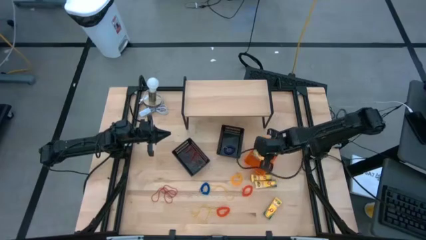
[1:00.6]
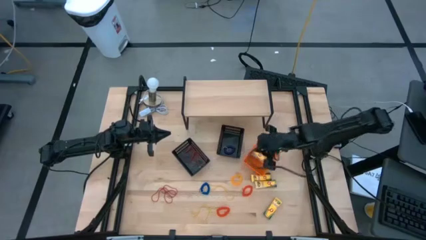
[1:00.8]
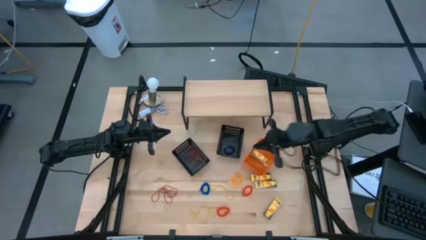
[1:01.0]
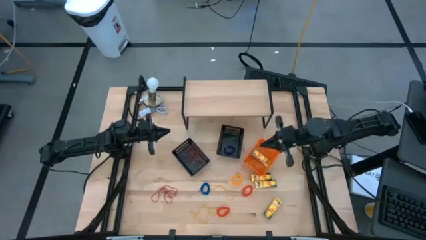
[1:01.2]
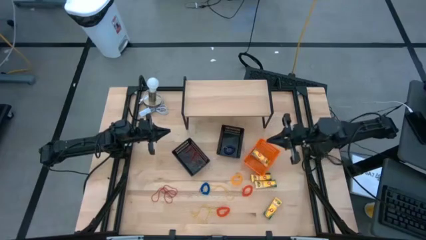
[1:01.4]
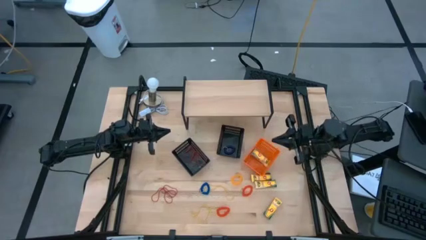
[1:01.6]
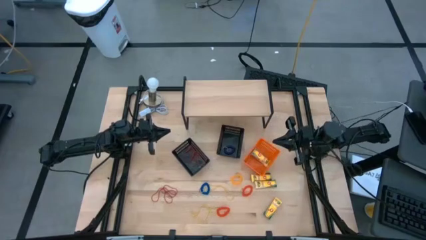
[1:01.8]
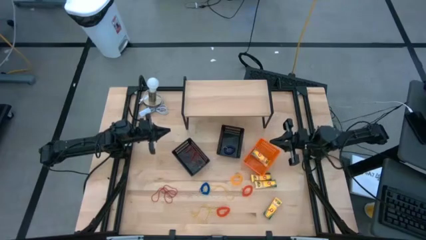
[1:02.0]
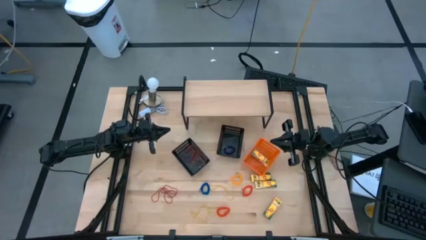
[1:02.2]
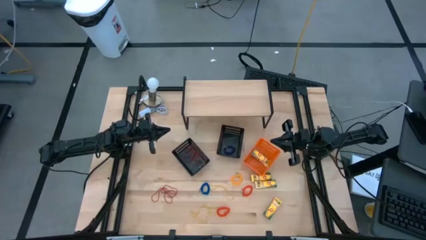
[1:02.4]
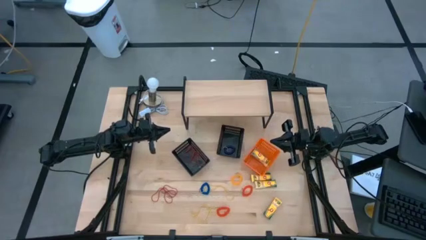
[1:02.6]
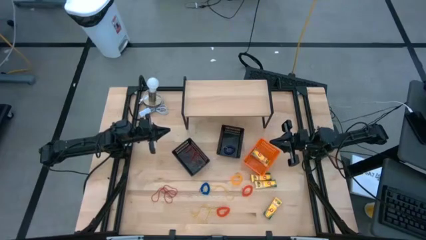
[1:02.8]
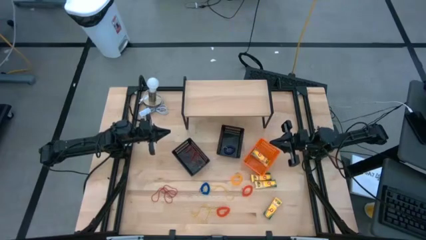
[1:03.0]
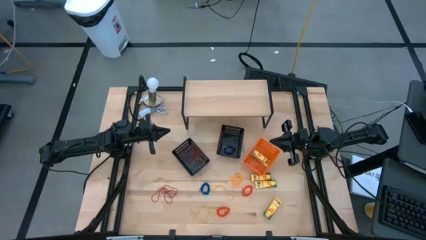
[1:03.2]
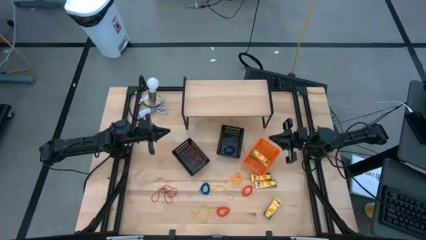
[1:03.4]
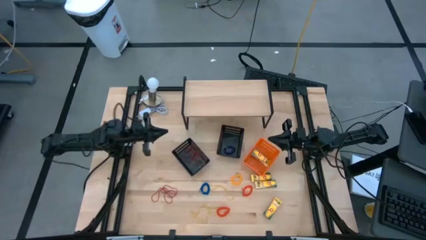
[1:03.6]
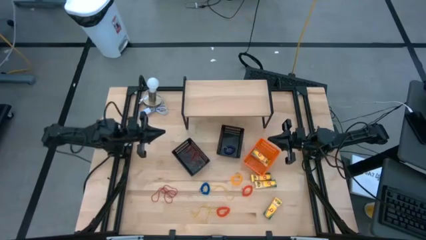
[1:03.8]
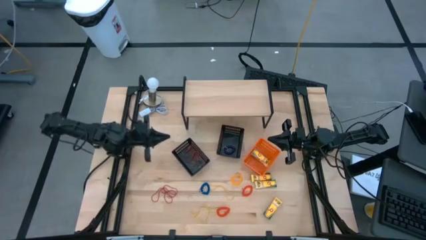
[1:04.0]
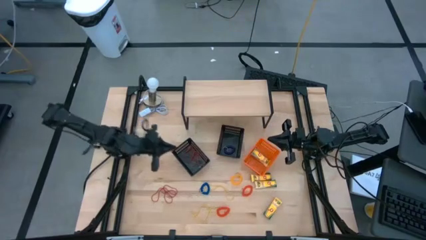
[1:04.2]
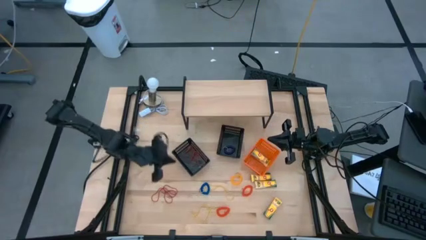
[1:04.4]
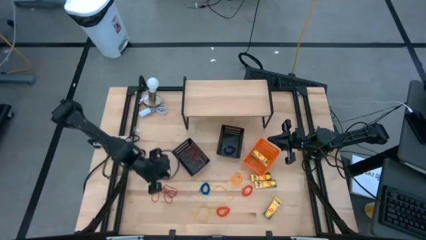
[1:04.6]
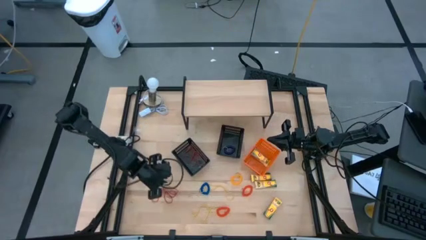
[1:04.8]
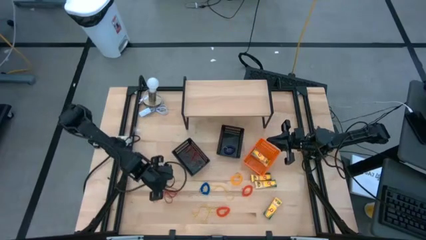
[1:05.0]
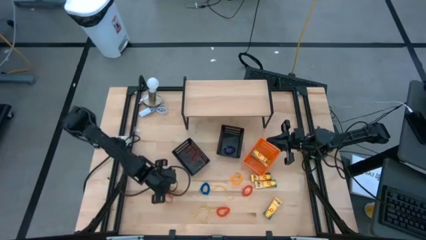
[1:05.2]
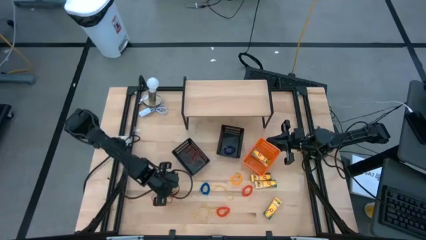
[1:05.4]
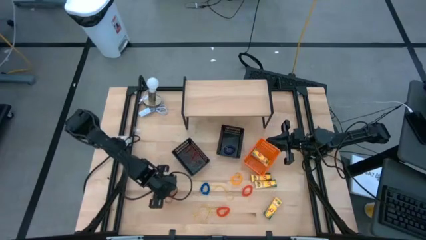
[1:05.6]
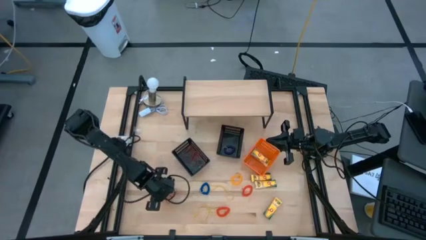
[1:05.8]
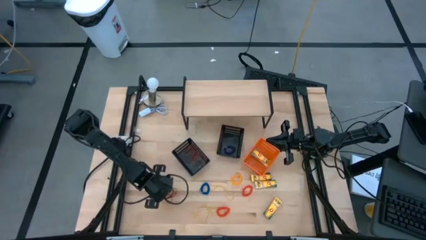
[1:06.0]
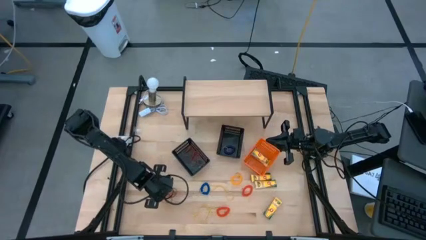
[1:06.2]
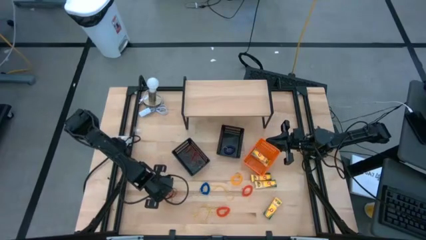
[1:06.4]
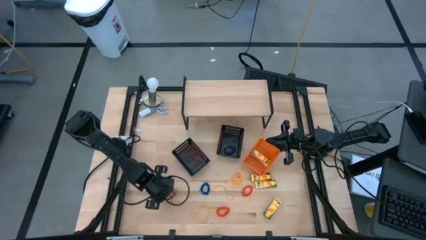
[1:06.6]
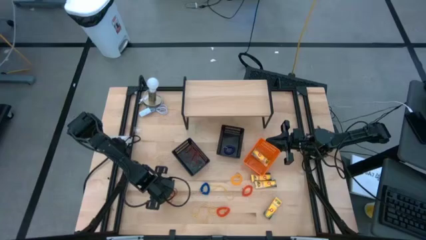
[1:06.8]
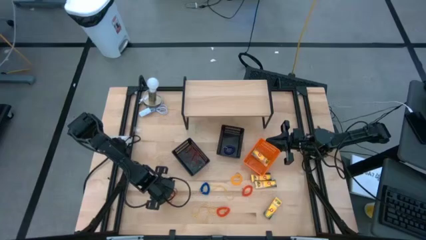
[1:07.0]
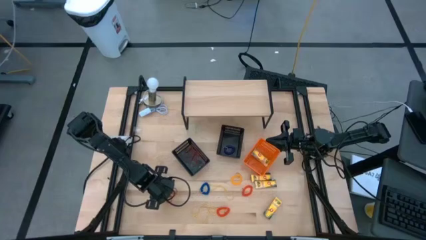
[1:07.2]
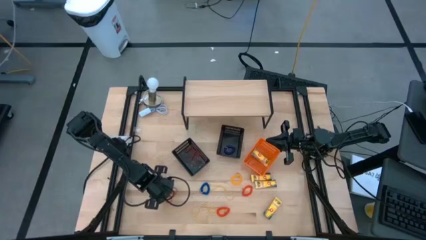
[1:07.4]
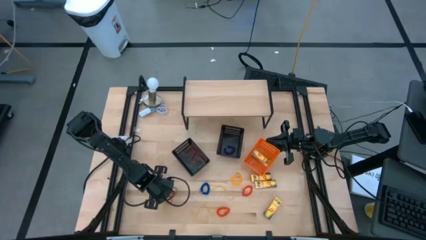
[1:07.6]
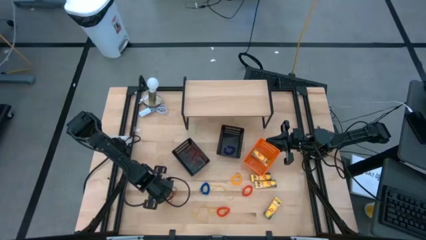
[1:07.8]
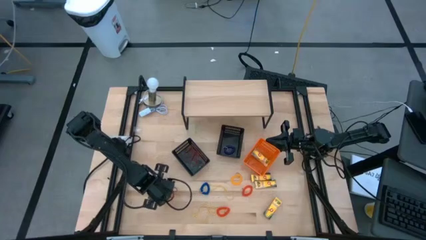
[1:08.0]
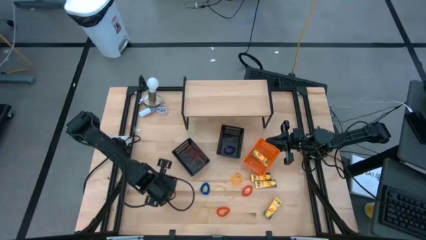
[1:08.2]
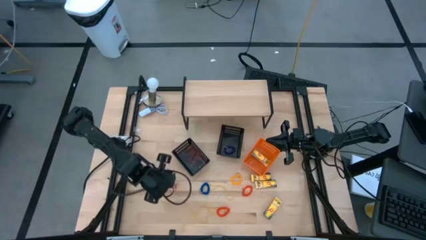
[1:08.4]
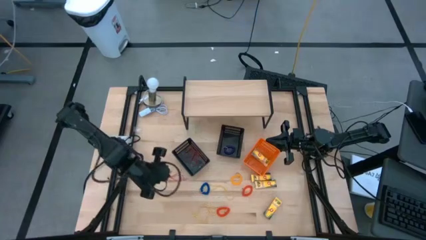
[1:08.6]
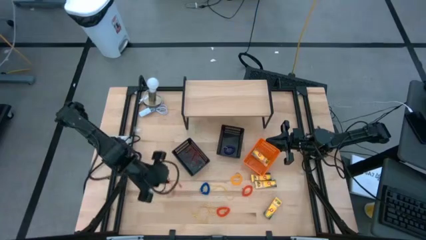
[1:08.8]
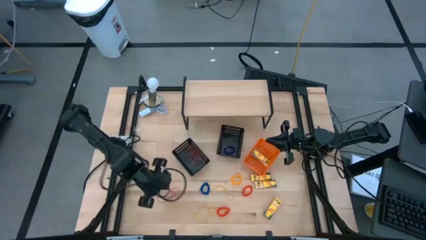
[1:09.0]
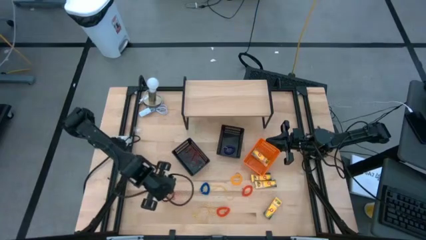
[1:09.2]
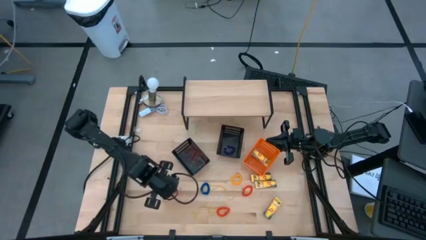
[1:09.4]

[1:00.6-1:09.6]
Task: Pick & Place Office Desk Supplies
Put the red rubber band into the left black bin

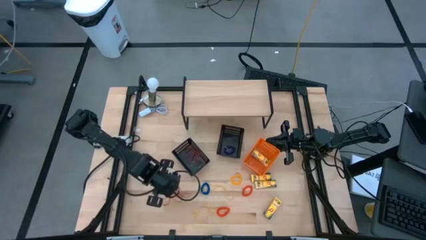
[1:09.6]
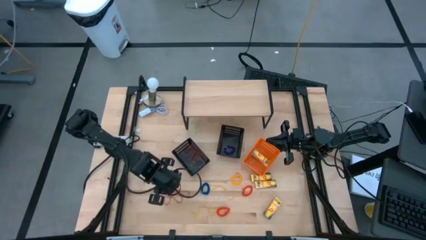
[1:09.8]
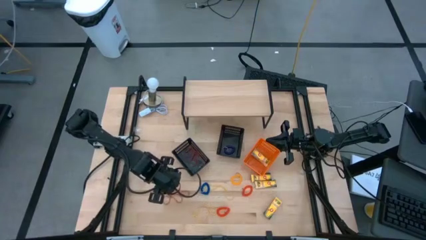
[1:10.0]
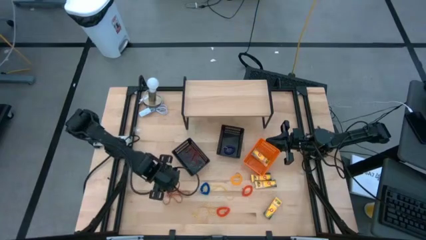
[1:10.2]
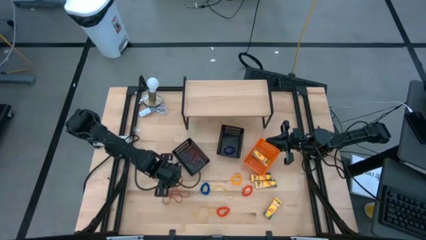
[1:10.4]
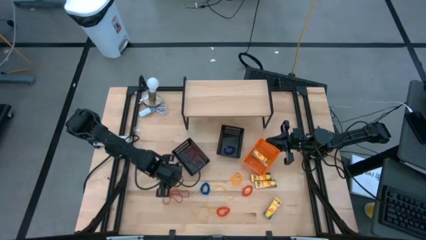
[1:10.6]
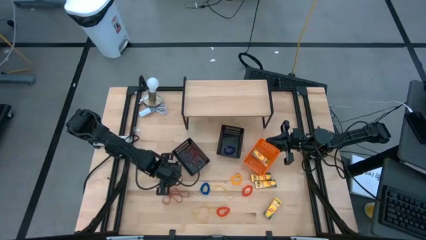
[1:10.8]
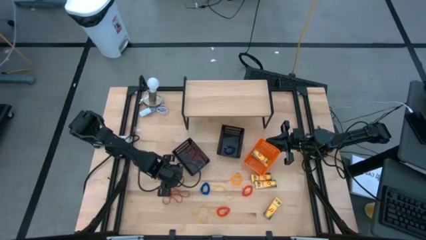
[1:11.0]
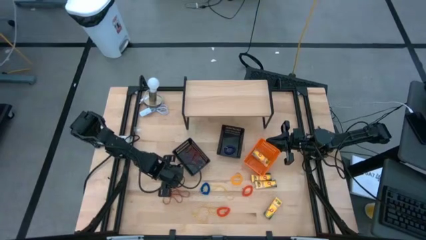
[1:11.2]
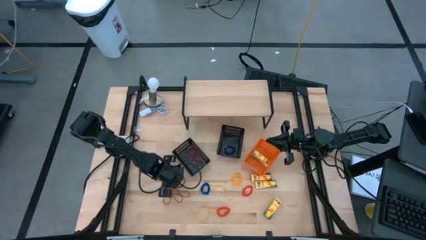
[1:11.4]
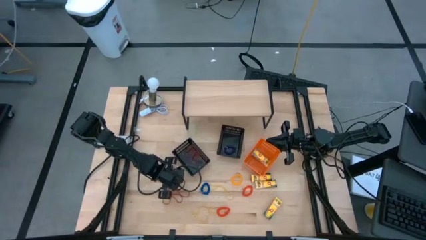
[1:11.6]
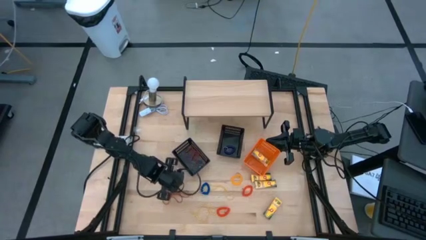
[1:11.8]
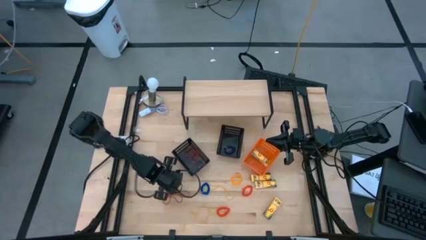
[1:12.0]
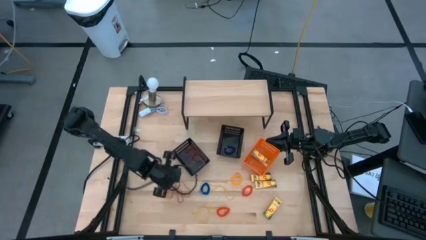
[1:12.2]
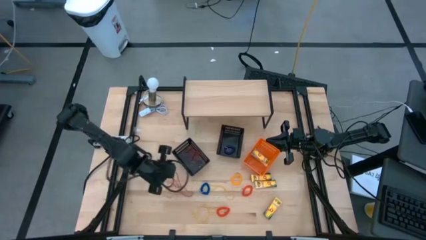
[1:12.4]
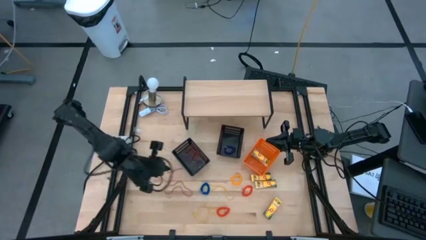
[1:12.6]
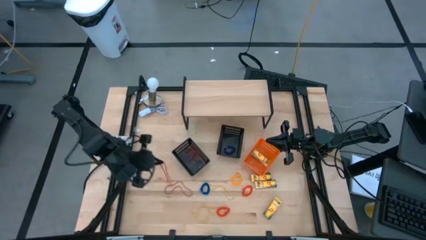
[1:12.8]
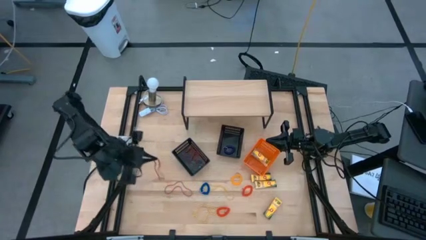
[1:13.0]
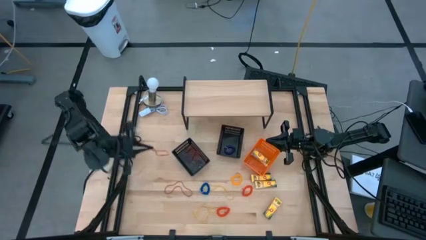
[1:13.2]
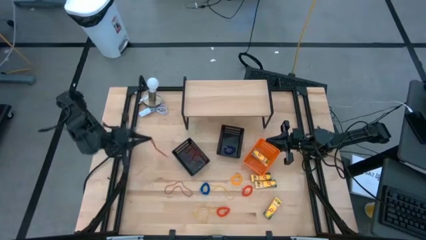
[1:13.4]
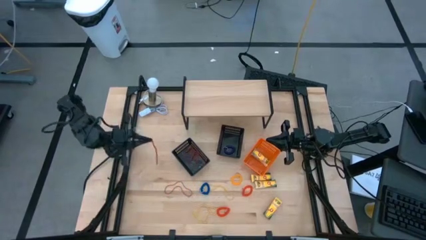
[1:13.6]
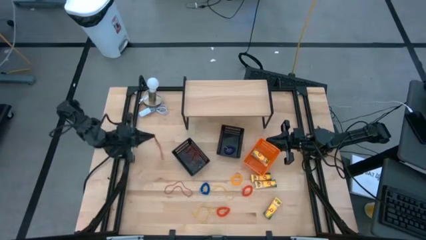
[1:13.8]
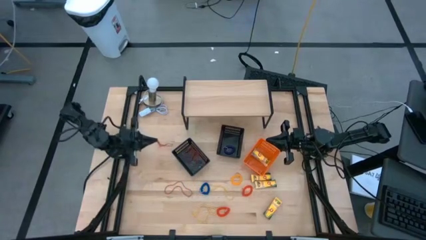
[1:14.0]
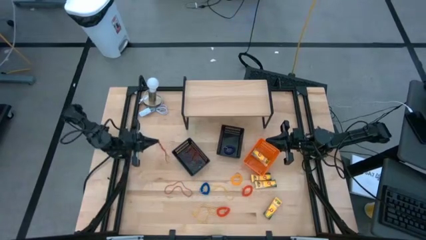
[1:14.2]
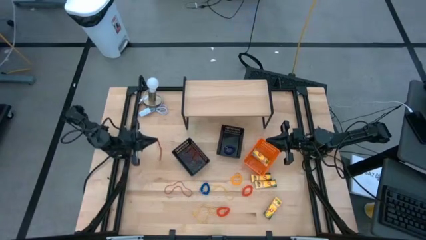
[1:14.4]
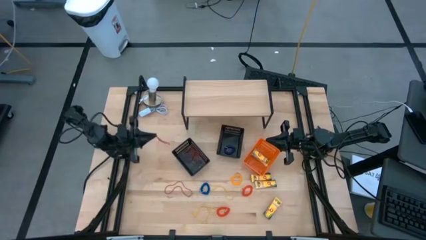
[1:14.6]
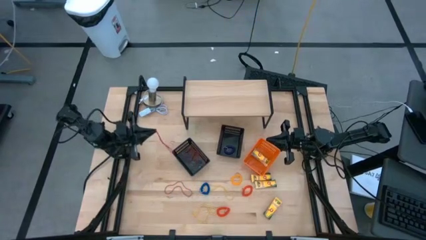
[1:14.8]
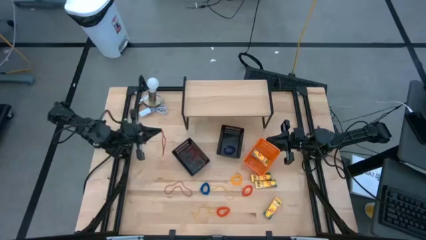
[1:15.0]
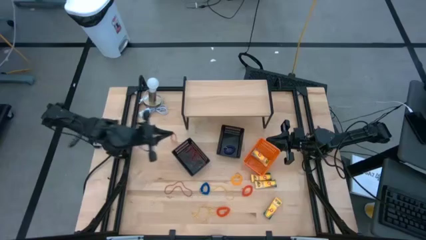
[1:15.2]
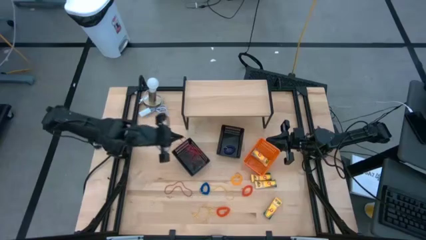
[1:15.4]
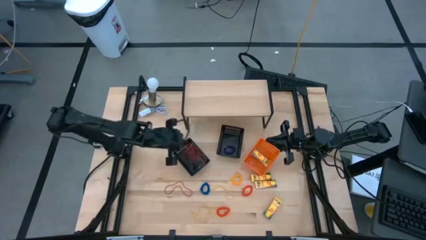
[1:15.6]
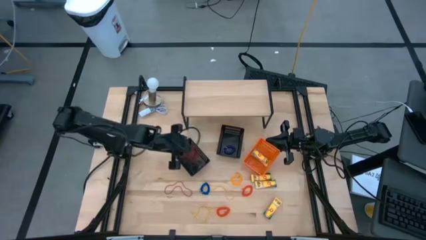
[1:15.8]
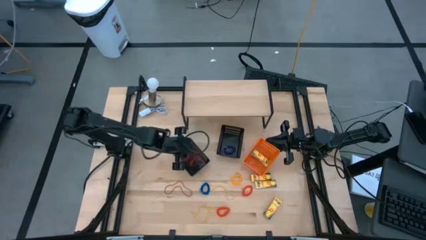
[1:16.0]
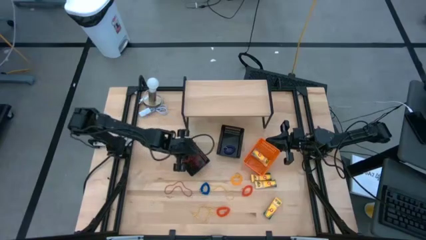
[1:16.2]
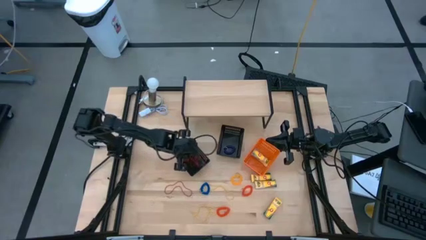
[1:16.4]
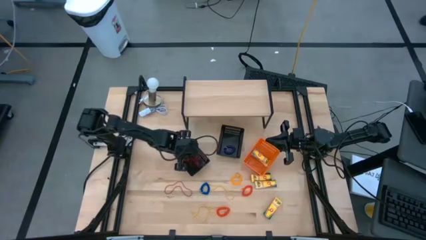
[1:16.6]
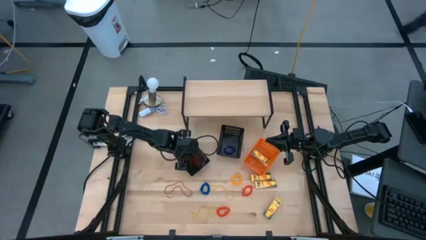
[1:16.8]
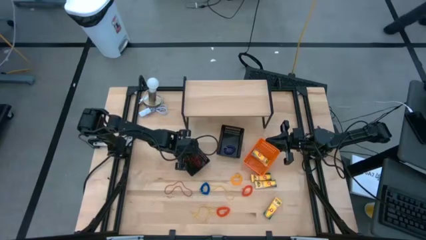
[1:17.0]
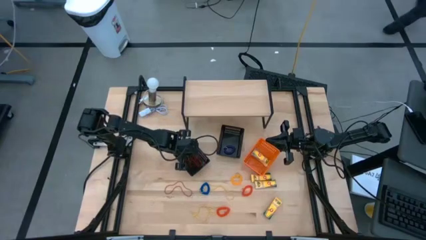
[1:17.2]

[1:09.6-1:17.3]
Put the red rubber band into the left black bin
